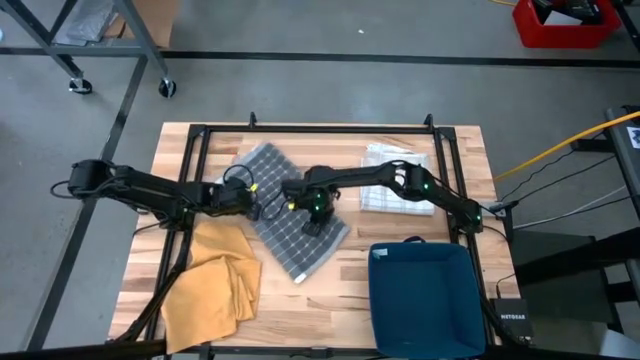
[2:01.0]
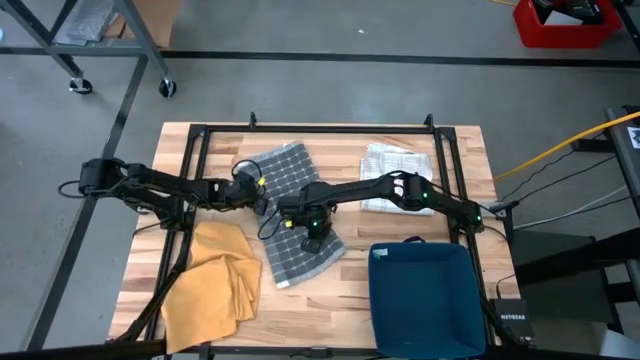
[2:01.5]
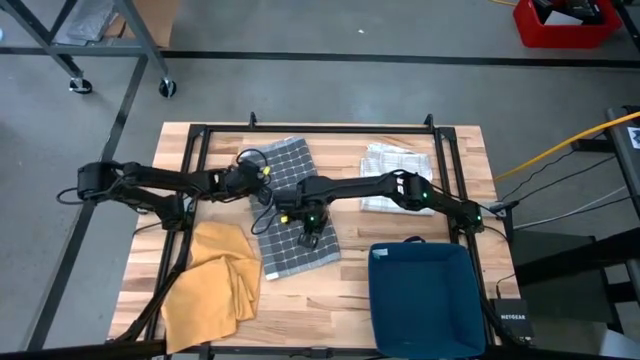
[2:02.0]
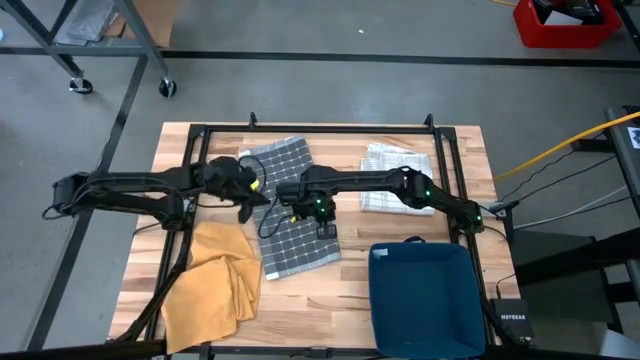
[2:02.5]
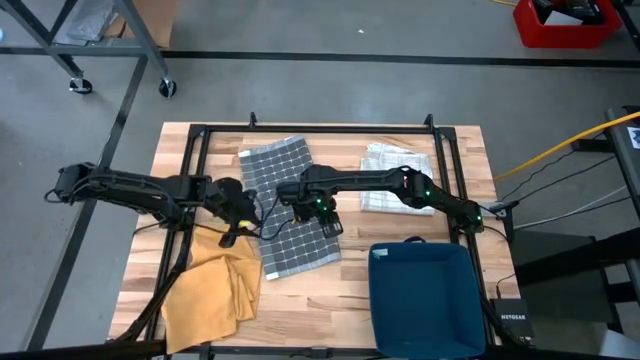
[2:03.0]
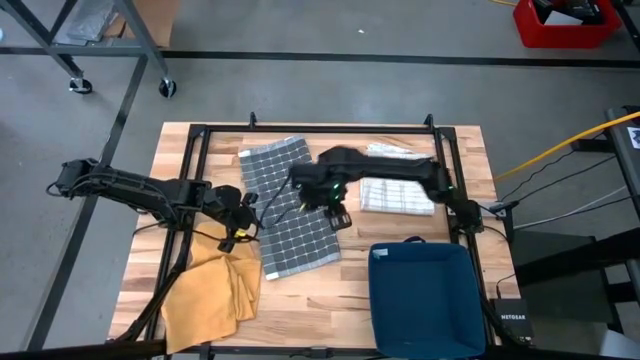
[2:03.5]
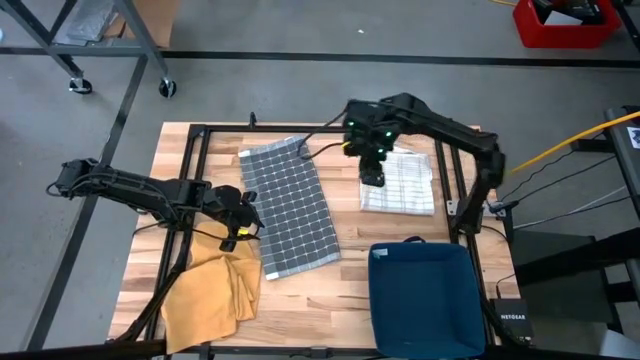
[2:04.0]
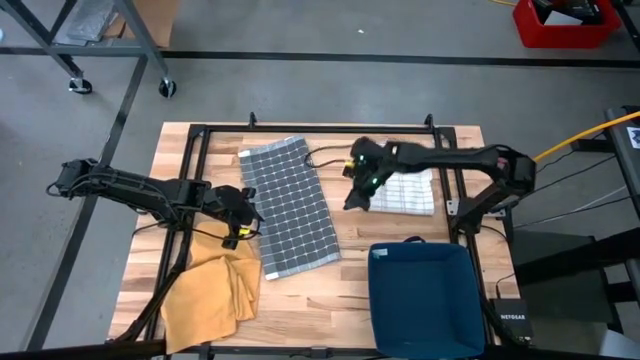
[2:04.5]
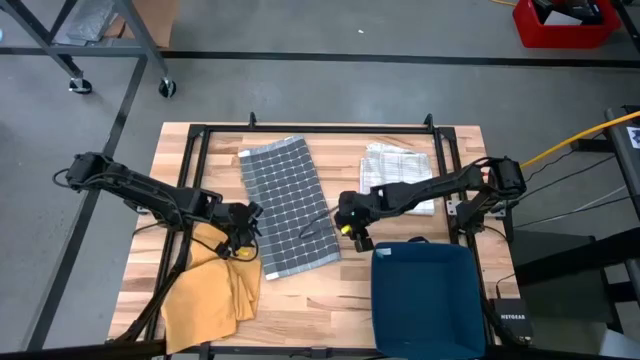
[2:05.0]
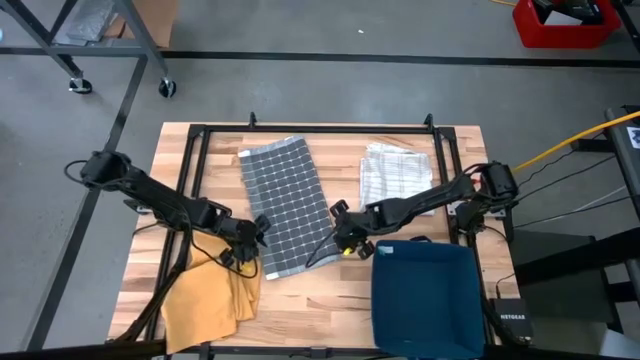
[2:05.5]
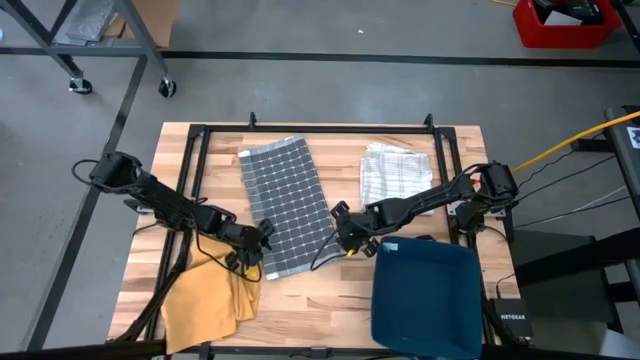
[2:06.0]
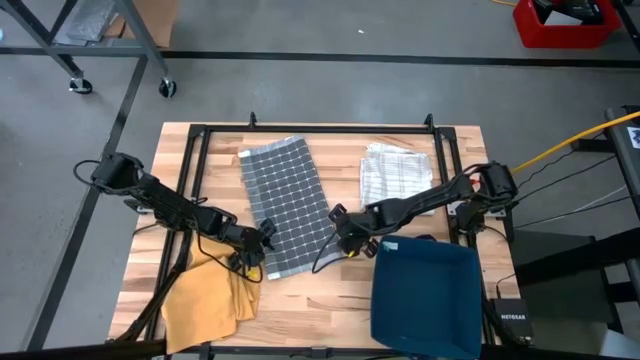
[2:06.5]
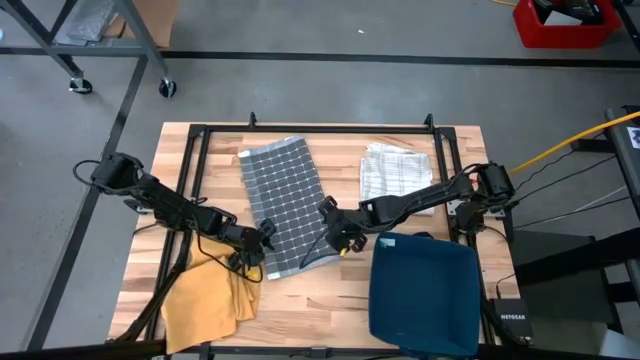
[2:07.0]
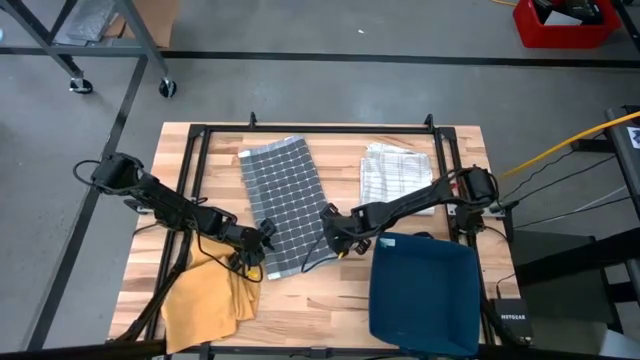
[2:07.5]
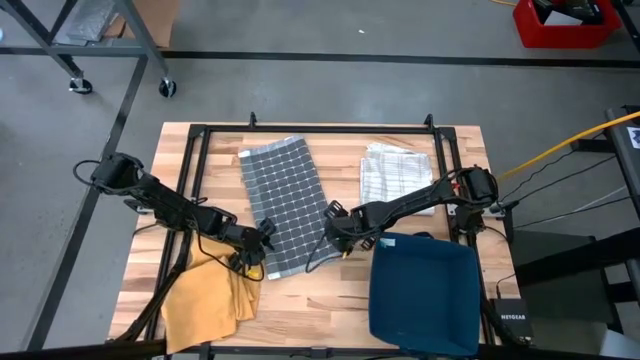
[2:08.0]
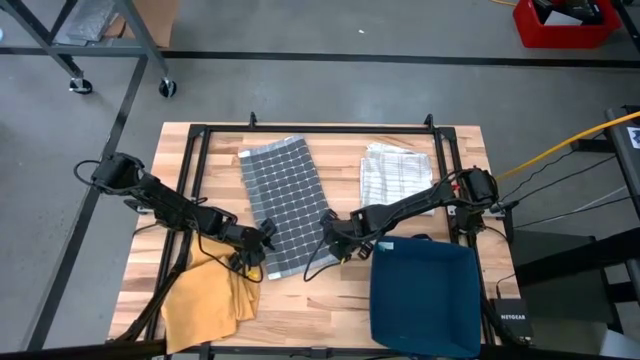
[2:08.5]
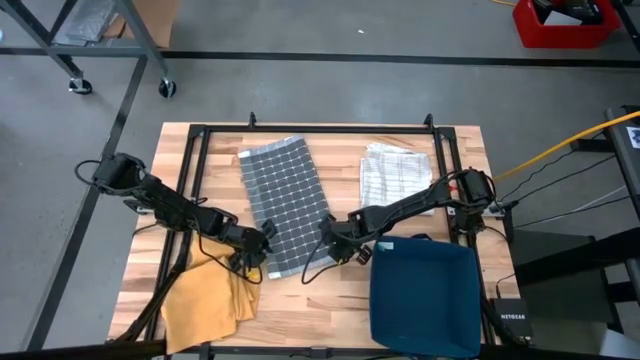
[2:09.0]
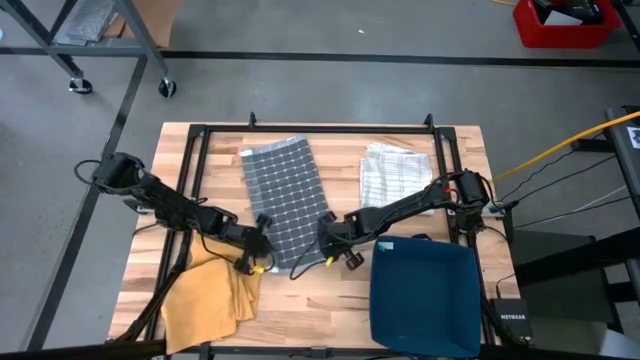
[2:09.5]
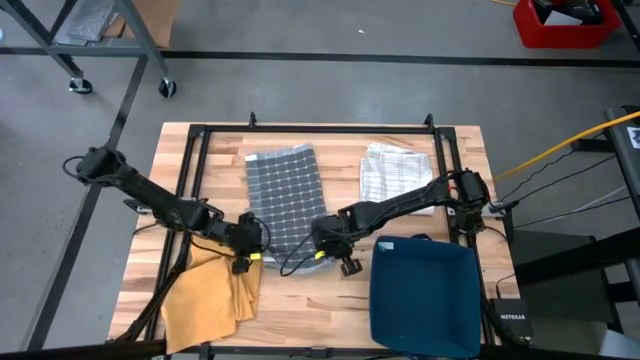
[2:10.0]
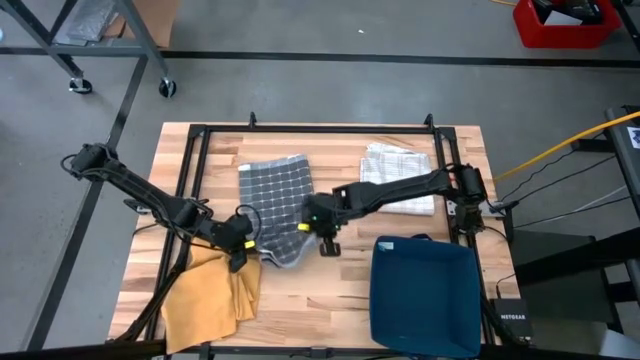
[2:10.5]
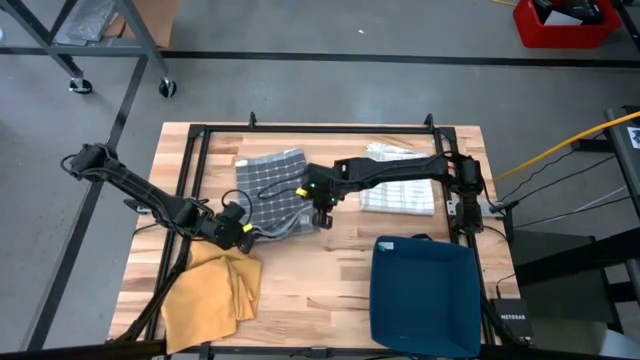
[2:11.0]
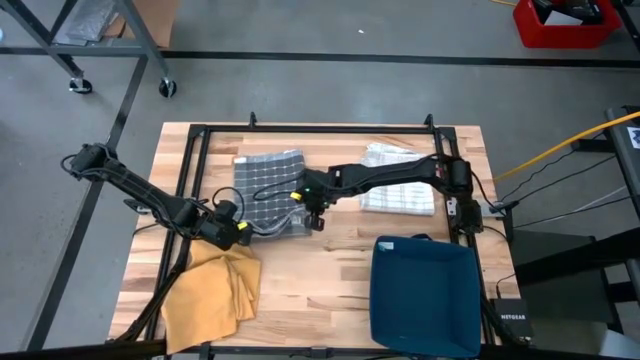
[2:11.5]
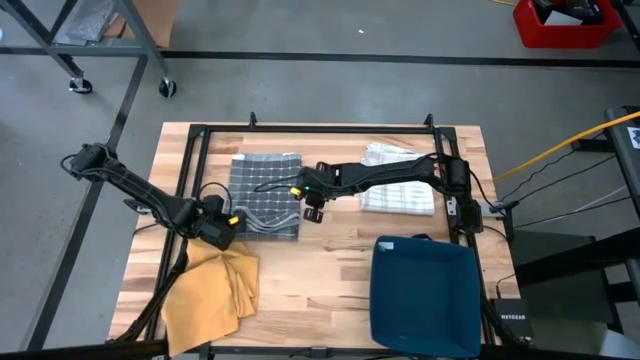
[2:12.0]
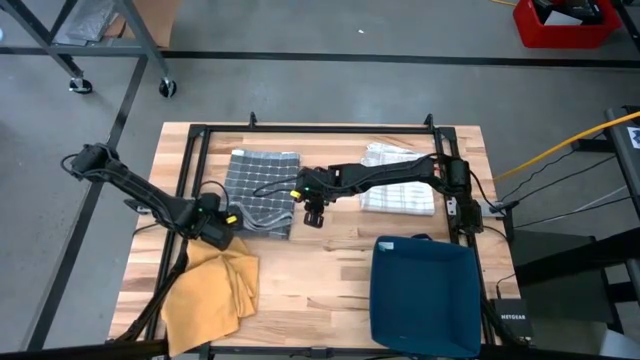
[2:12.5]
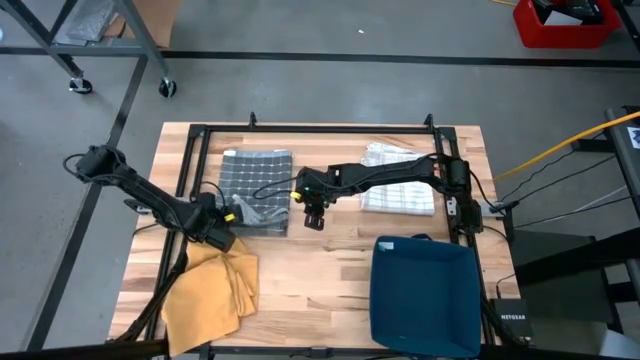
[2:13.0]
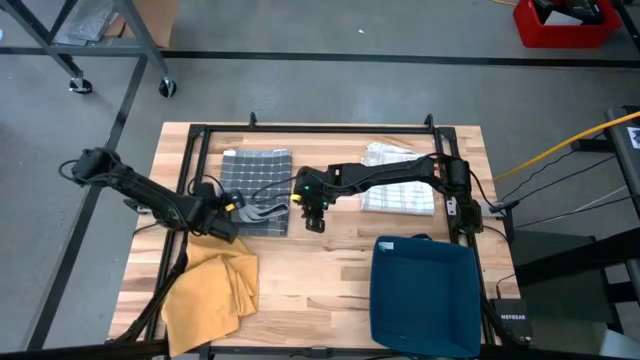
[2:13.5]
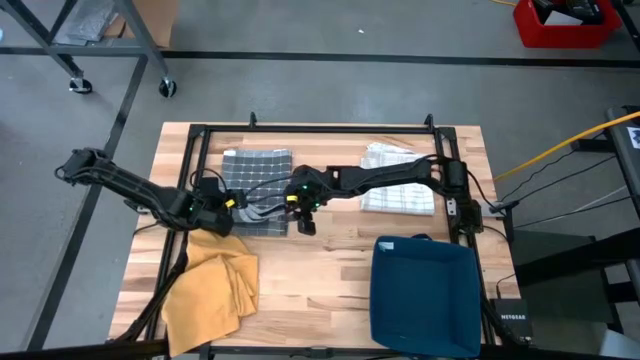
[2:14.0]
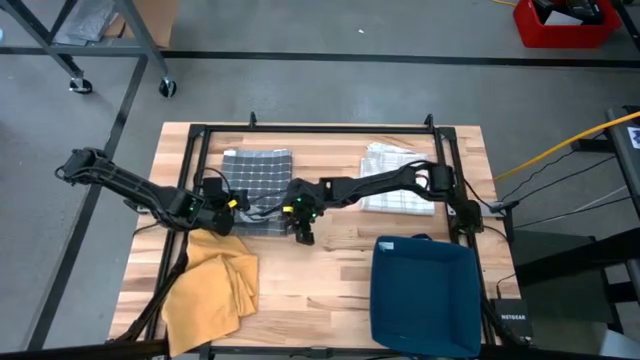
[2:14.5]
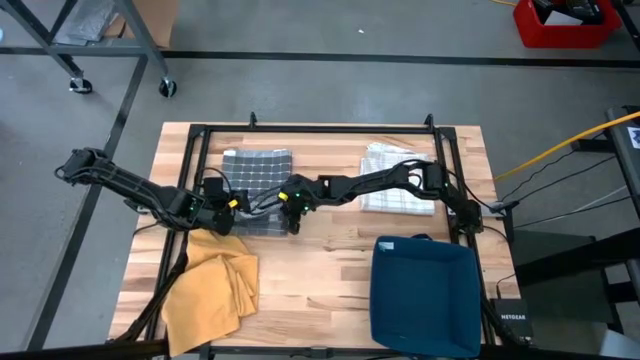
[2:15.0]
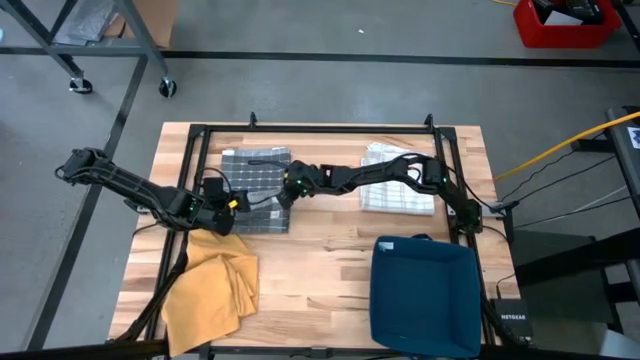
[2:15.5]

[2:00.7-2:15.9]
Task: Fold towel
Fold the gray towel

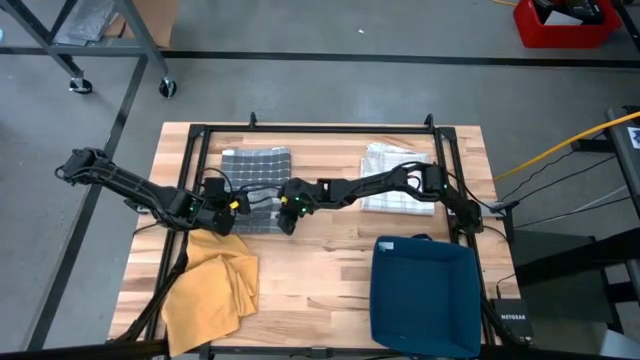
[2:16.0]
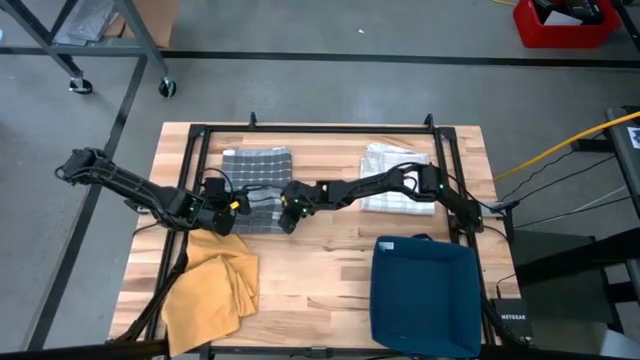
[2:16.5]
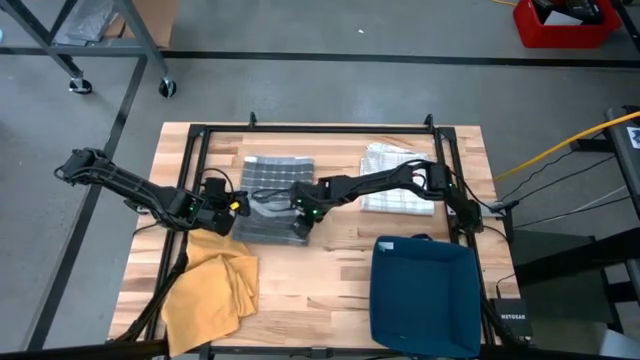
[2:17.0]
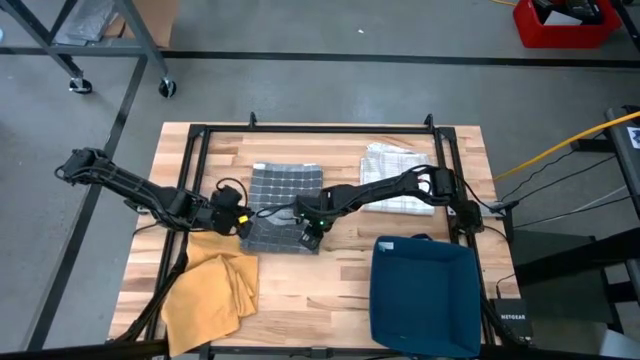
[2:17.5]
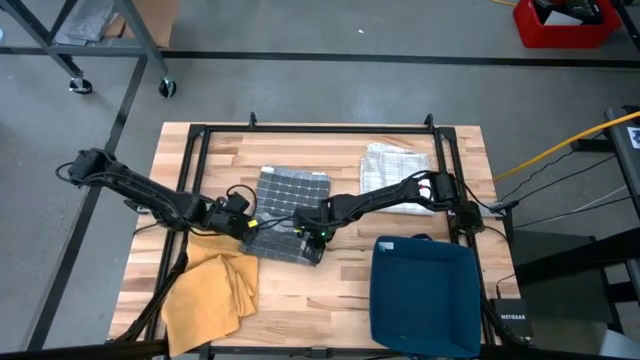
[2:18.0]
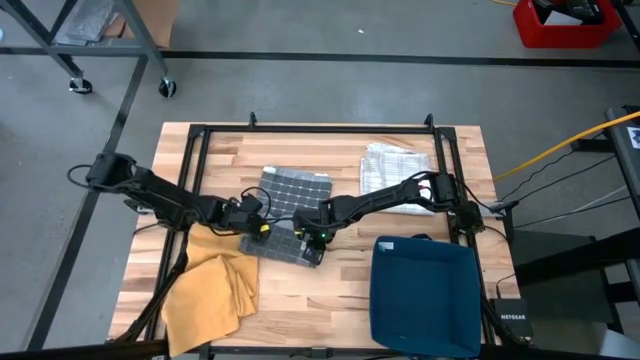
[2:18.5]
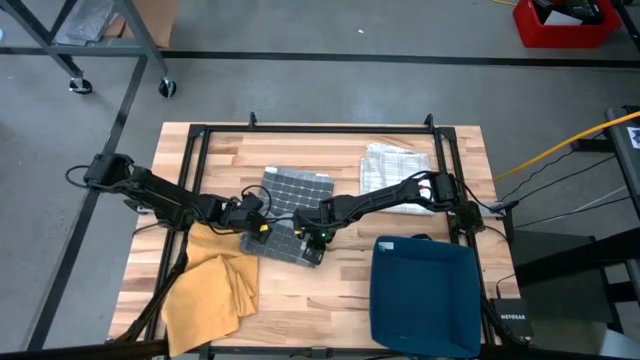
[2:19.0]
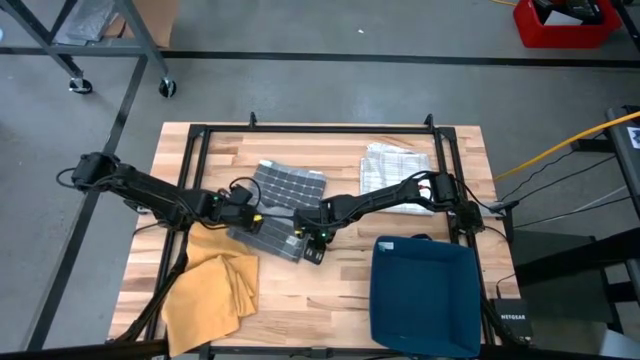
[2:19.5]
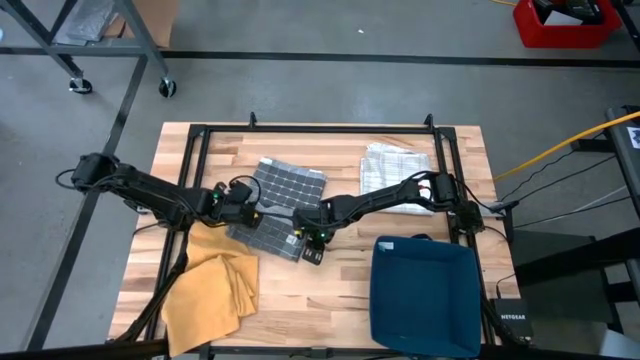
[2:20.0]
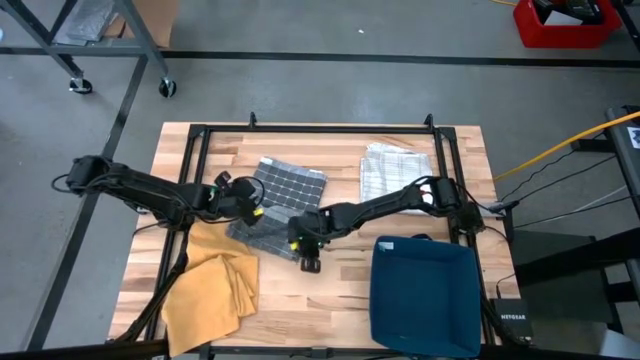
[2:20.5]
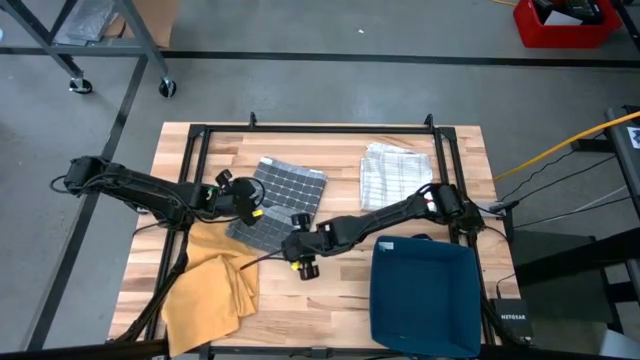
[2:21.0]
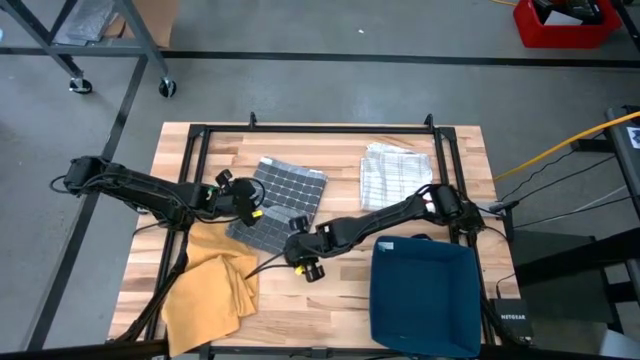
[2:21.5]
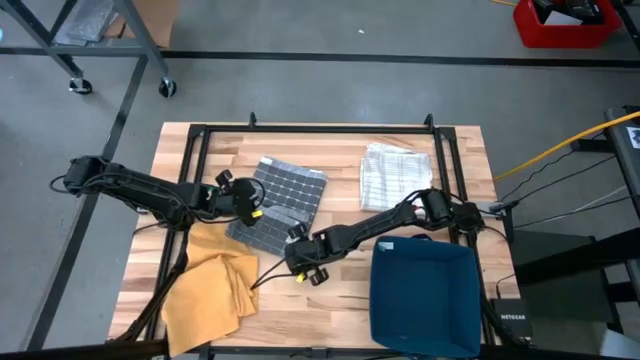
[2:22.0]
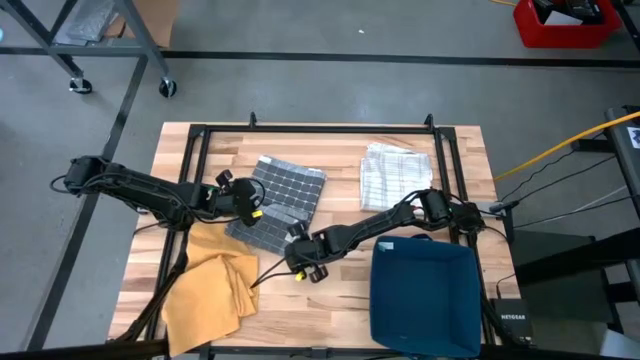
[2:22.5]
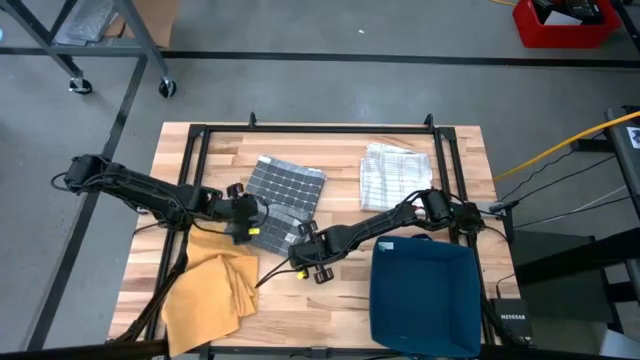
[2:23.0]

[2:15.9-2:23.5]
Fold the gray towel
